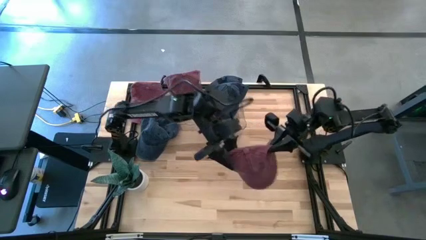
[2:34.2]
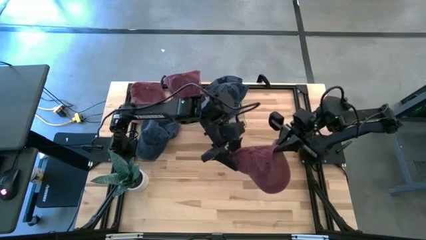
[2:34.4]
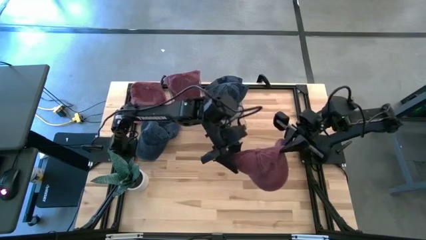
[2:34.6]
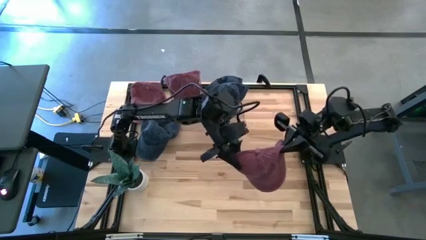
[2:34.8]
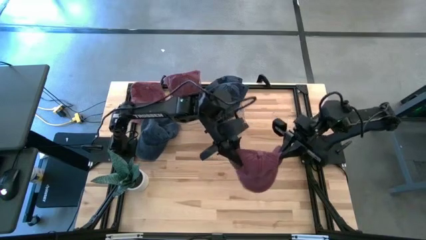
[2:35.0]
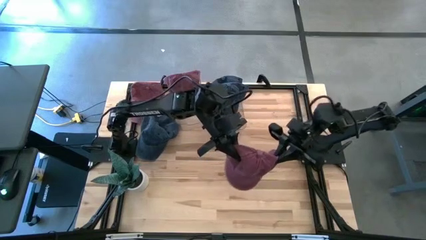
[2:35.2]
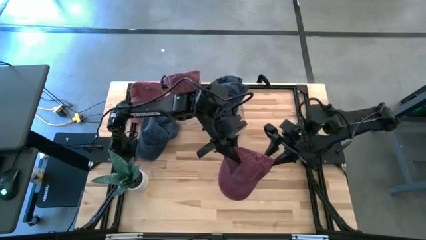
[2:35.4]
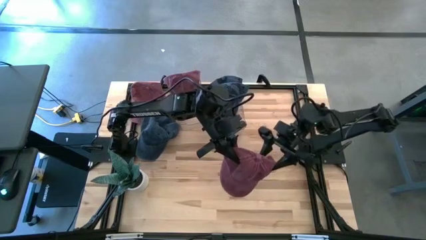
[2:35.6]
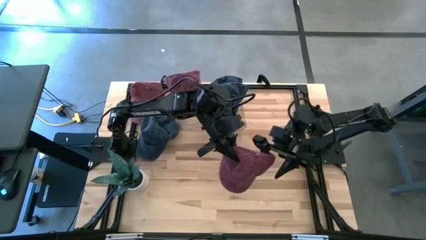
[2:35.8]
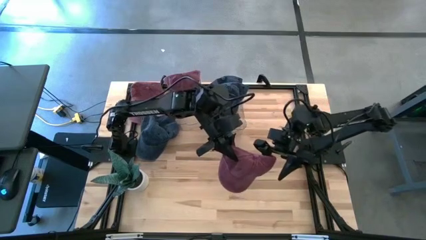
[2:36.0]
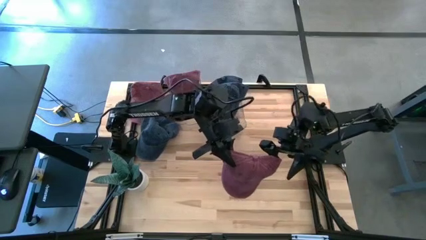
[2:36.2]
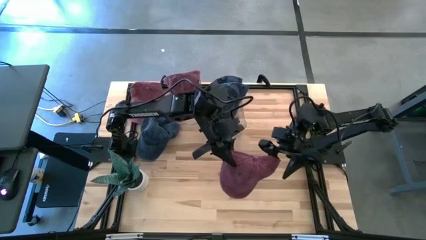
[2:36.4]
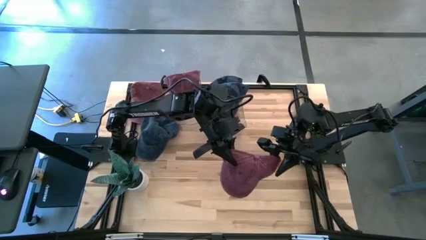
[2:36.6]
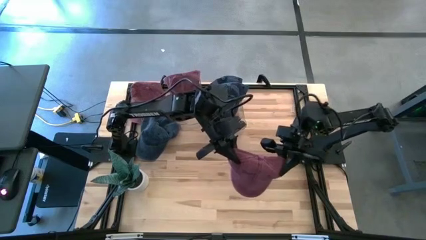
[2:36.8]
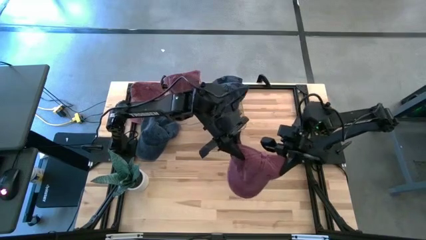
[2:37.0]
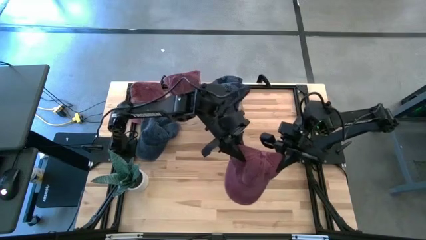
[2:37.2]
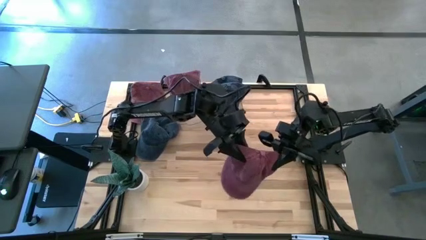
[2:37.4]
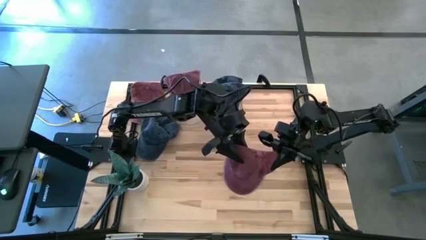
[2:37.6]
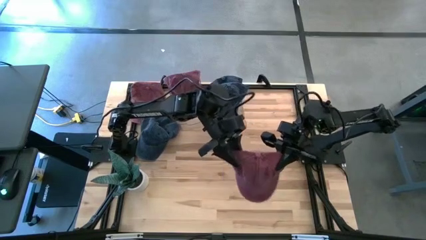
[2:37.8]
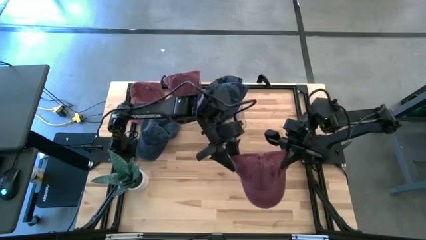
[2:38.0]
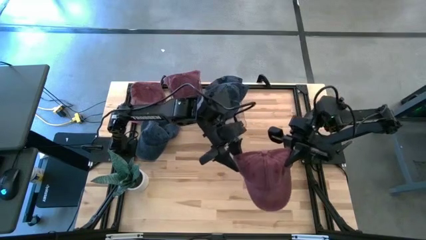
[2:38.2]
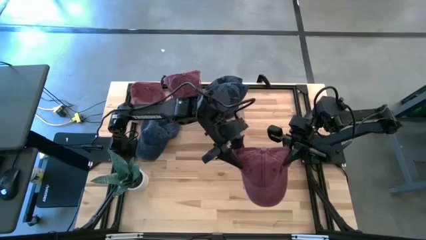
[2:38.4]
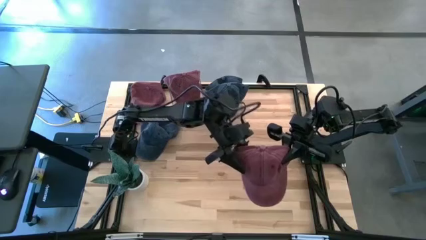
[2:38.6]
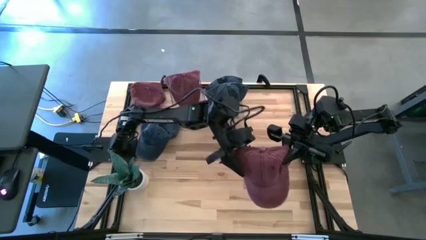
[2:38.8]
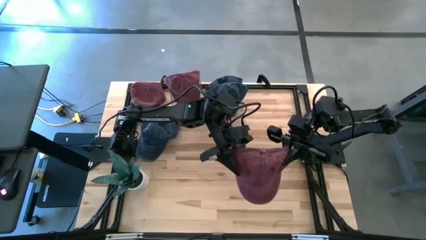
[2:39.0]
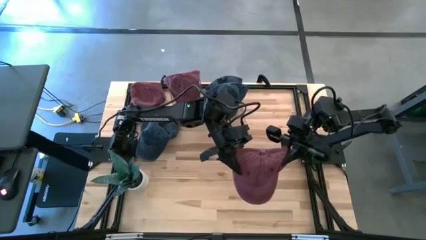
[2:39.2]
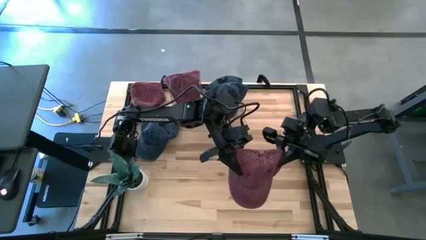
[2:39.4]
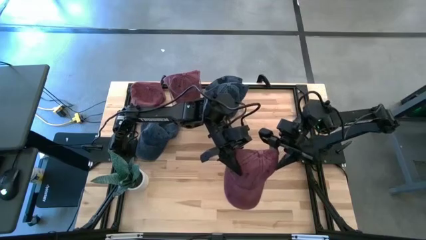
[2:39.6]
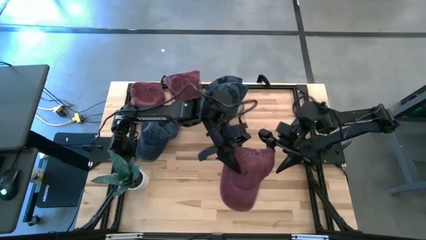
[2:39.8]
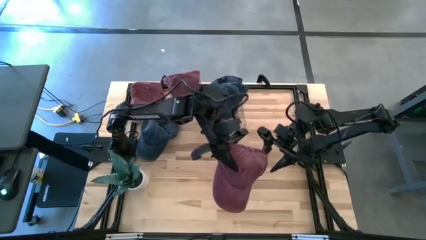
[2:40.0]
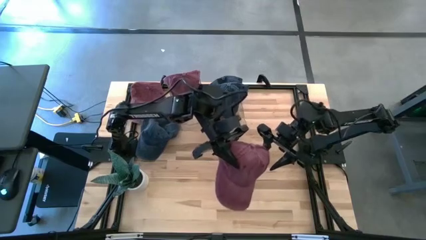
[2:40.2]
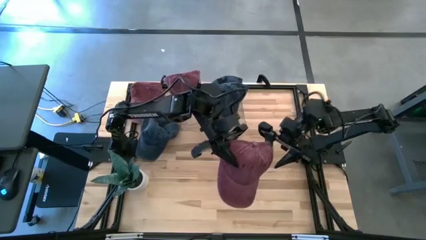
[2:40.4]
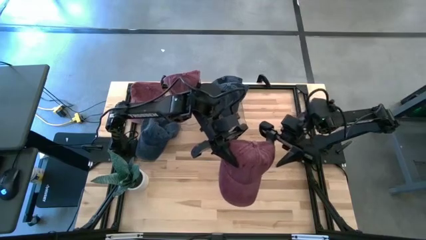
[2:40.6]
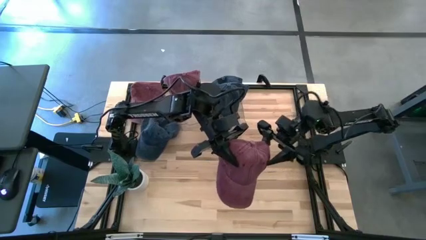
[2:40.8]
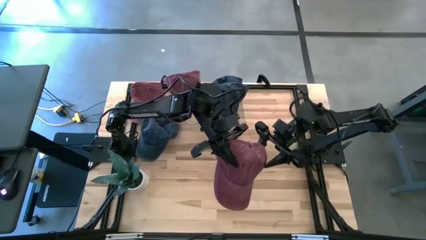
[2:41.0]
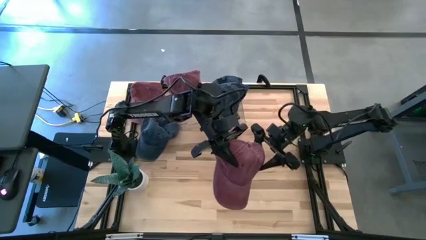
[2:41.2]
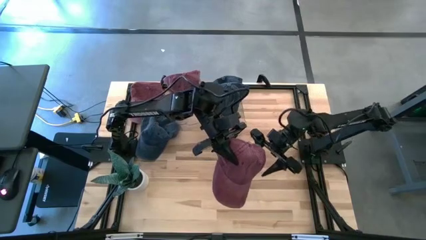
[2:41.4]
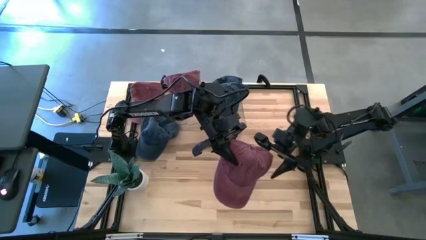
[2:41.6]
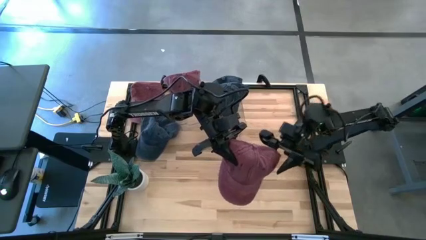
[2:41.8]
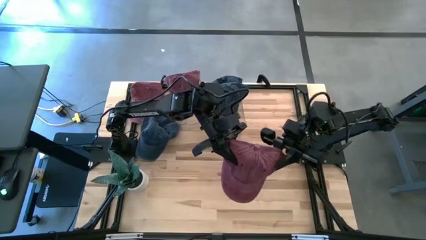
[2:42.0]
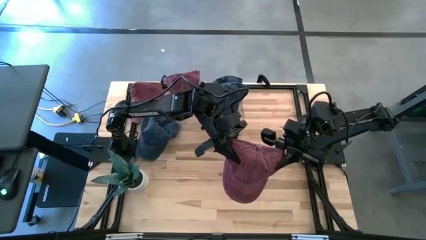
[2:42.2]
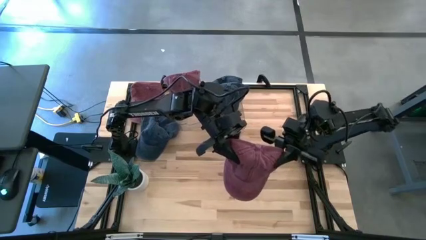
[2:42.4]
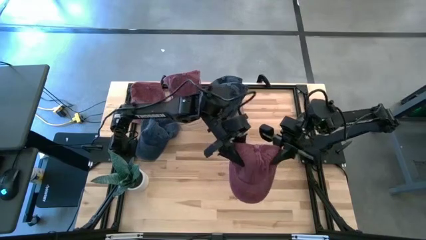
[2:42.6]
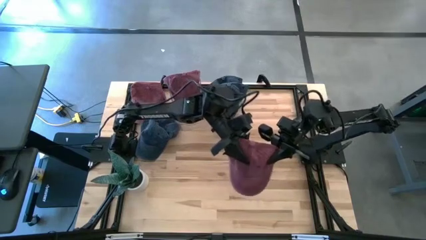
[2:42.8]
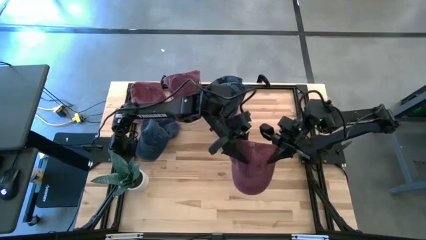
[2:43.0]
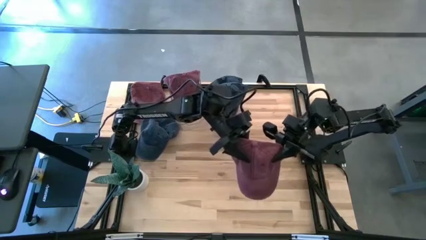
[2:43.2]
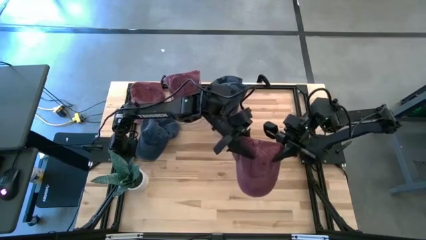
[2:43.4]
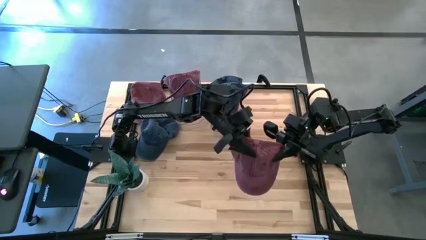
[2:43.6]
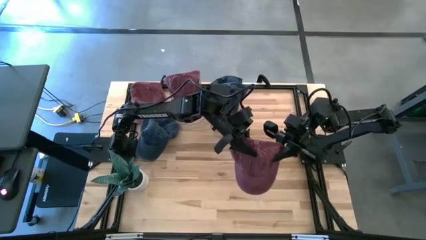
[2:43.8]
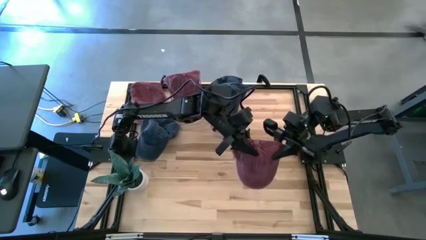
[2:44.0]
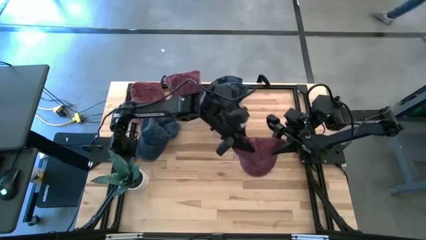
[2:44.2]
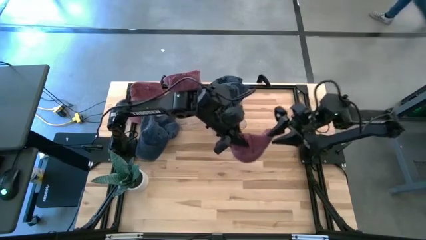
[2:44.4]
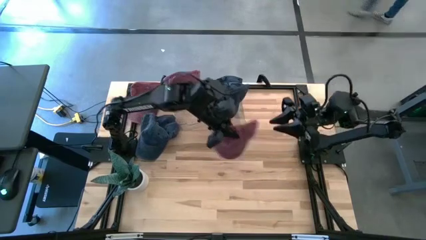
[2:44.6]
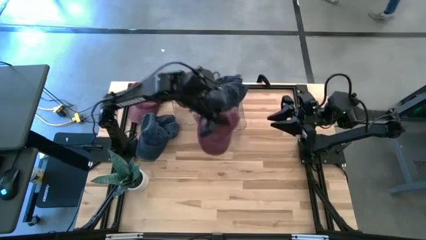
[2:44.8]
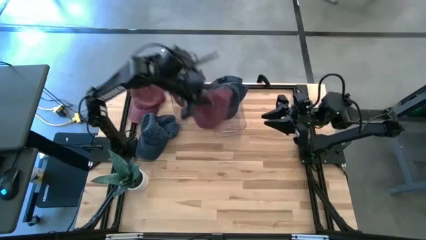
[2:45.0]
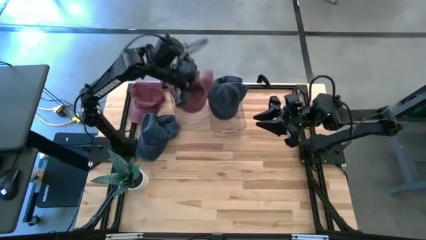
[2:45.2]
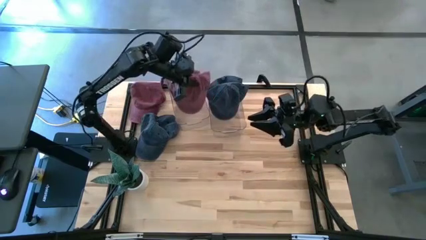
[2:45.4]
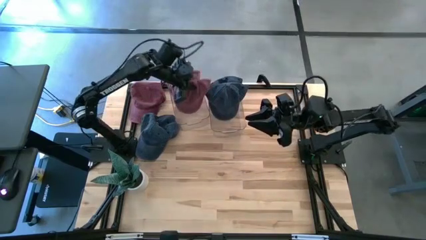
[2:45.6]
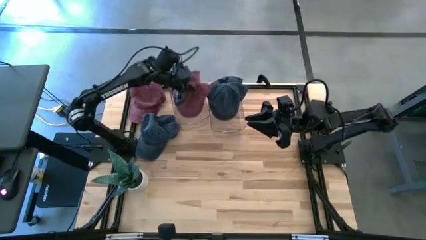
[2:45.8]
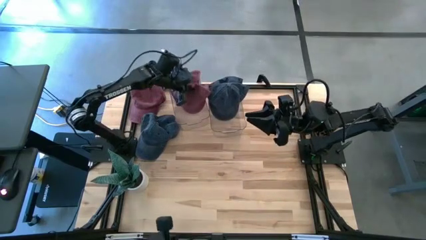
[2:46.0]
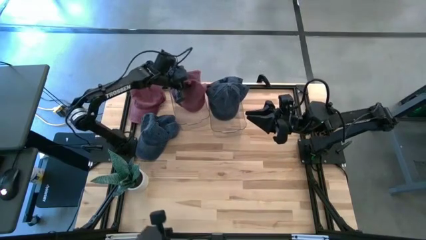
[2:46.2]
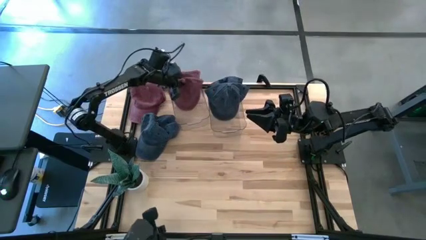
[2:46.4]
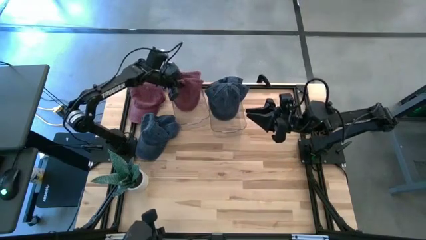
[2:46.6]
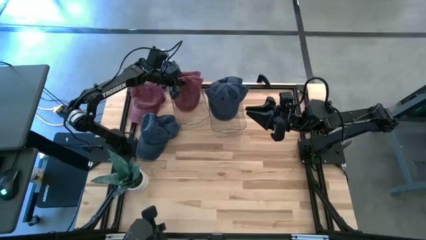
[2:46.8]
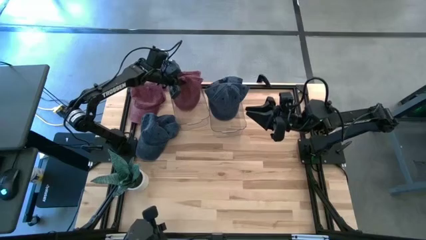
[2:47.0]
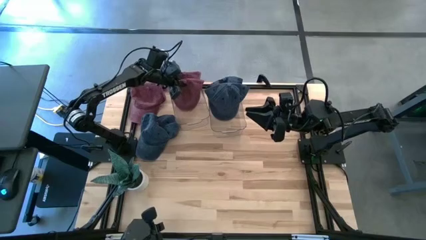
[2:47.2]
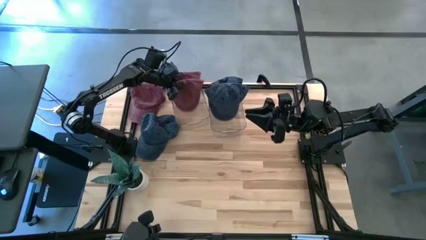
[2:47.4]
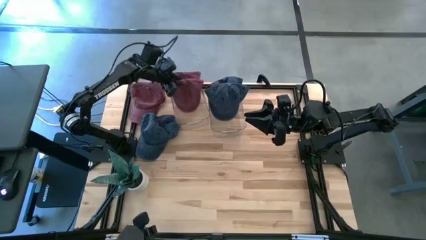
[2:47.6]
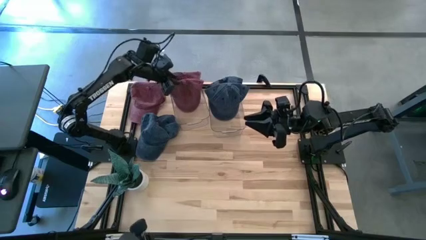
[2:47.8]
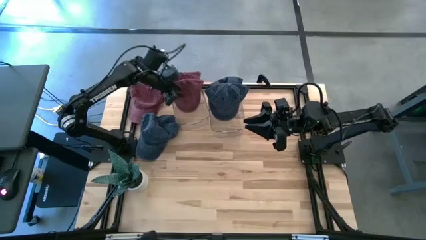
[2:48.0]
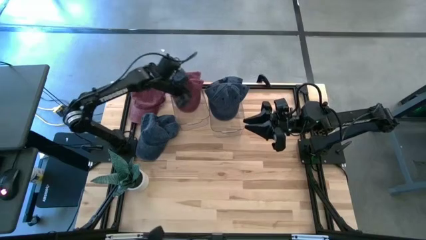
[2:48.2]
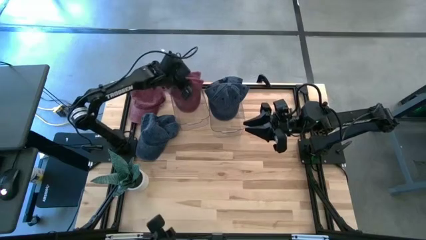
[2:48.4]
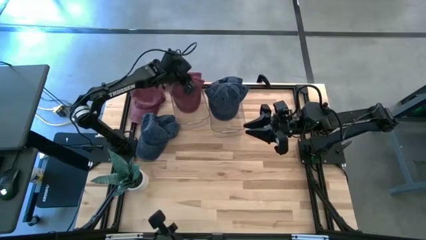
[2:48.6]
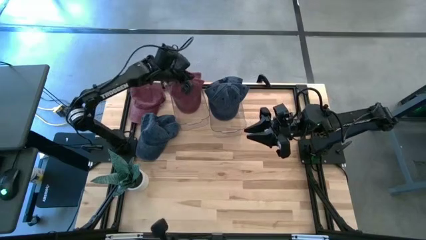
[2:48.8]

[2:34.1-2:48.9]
Task: Pick & Place hat
Put the bottom red cap into the left bin
